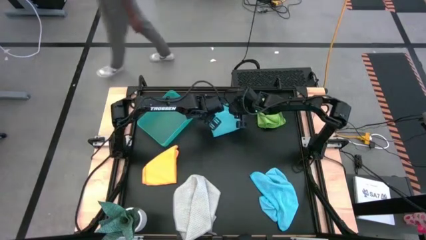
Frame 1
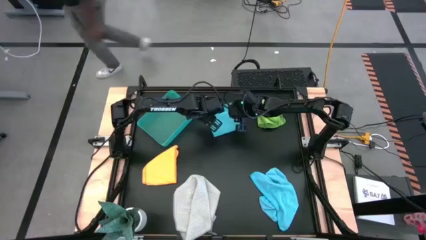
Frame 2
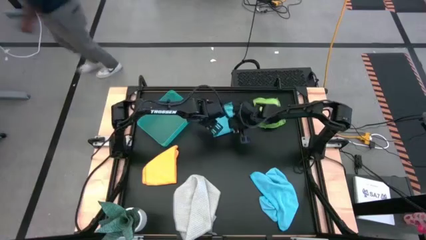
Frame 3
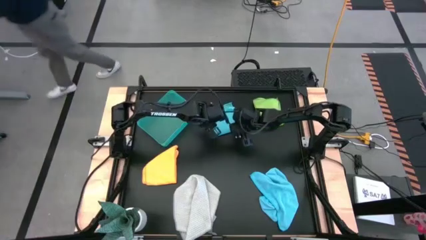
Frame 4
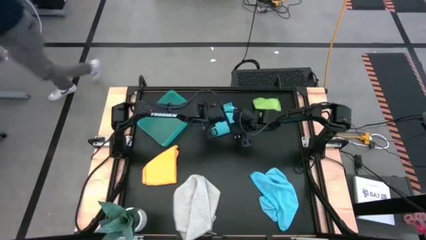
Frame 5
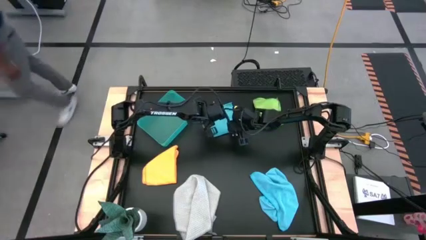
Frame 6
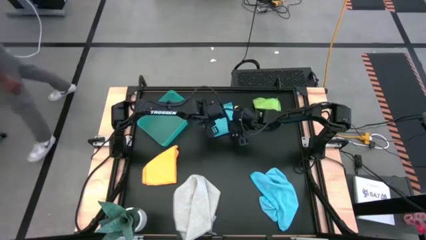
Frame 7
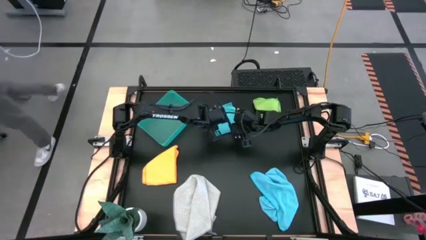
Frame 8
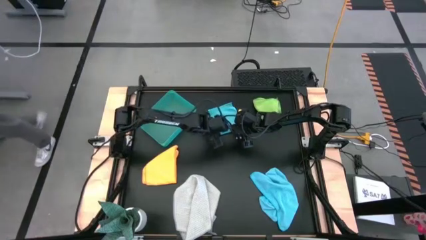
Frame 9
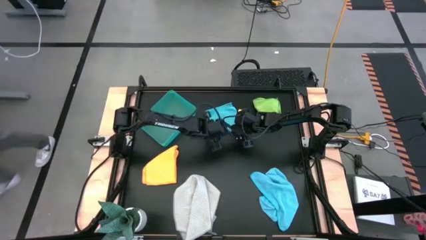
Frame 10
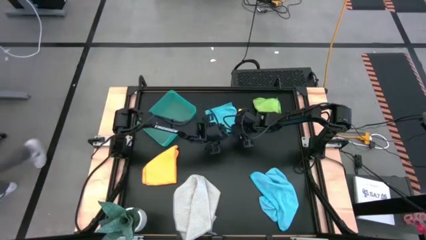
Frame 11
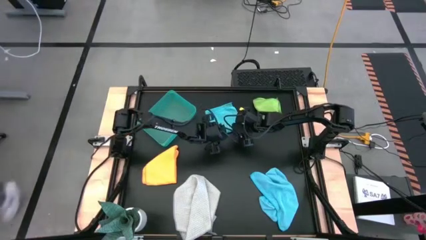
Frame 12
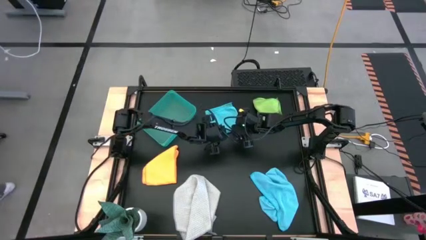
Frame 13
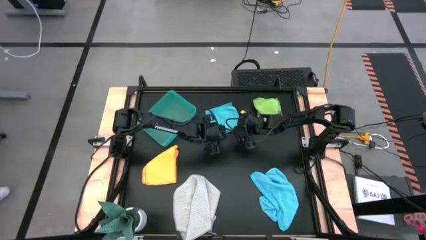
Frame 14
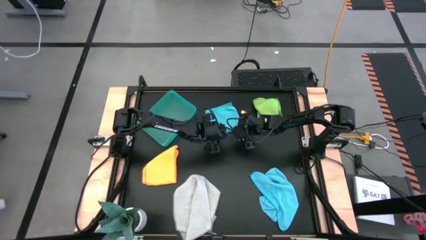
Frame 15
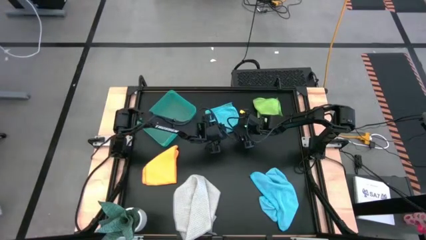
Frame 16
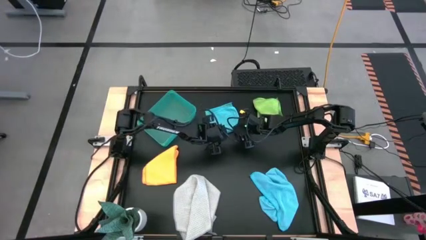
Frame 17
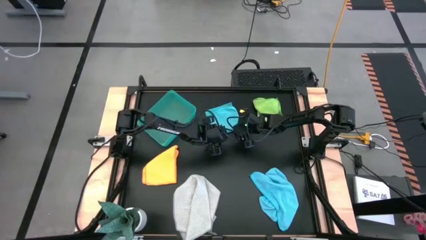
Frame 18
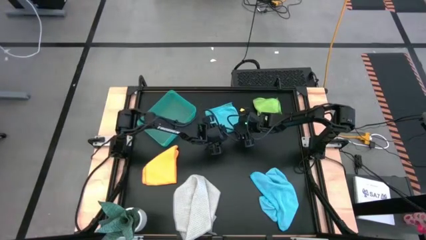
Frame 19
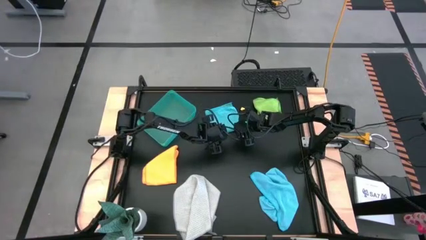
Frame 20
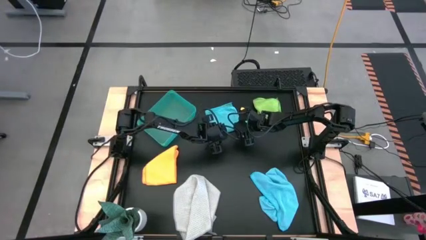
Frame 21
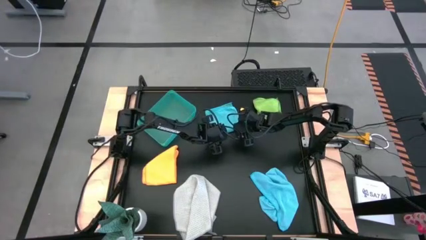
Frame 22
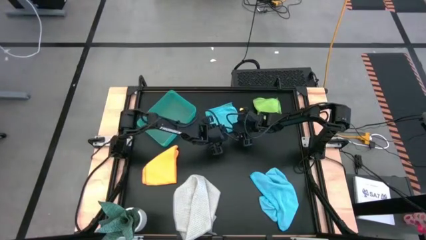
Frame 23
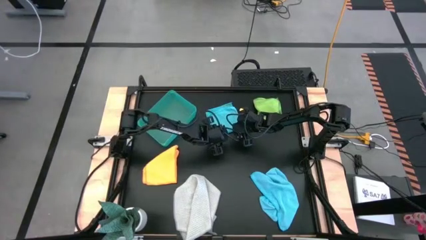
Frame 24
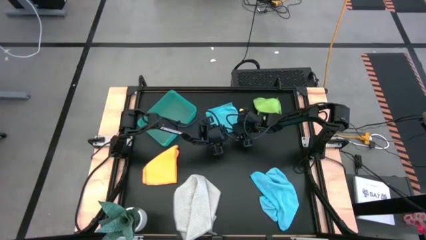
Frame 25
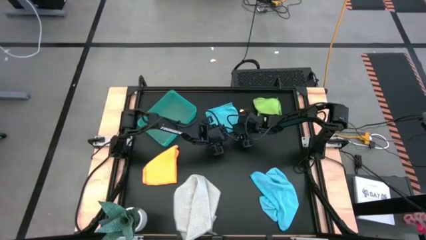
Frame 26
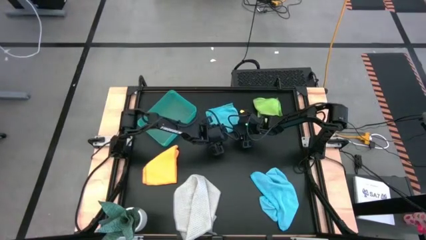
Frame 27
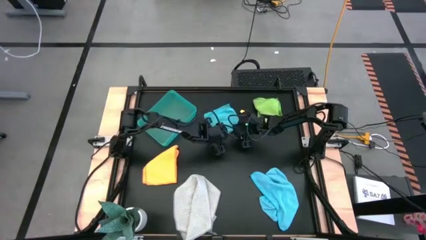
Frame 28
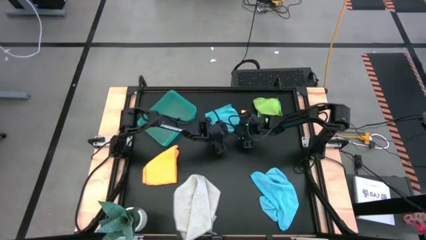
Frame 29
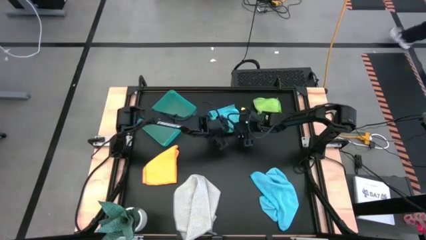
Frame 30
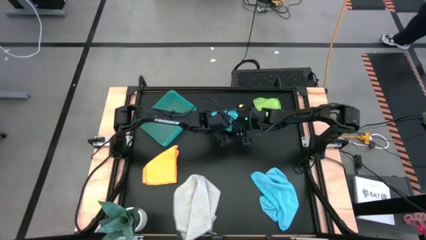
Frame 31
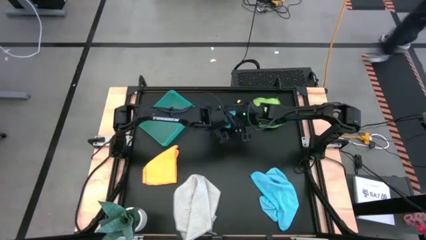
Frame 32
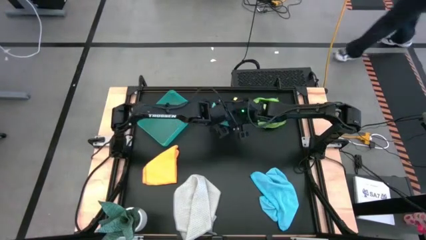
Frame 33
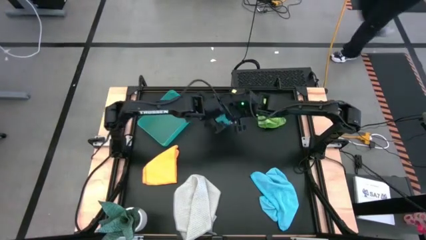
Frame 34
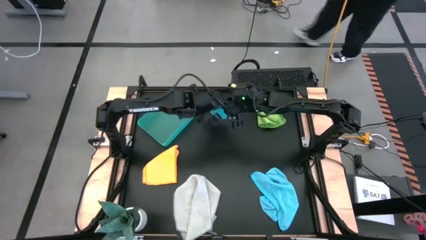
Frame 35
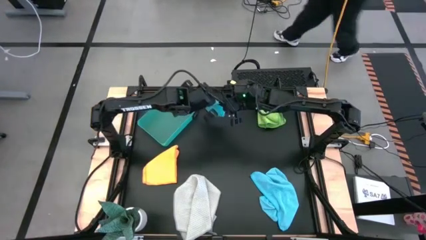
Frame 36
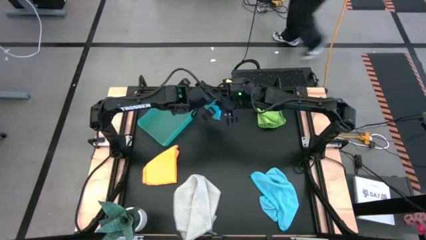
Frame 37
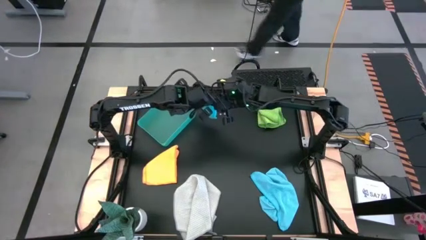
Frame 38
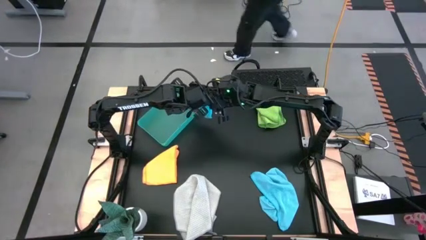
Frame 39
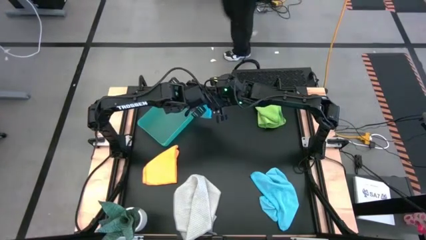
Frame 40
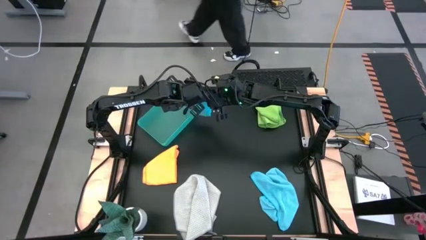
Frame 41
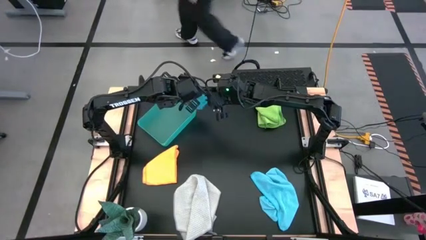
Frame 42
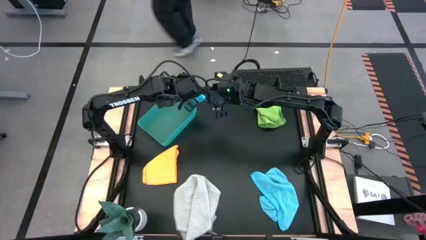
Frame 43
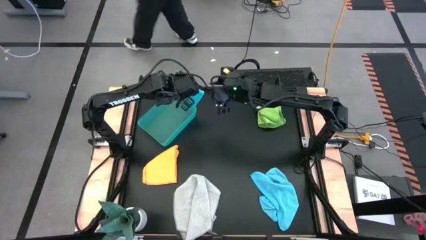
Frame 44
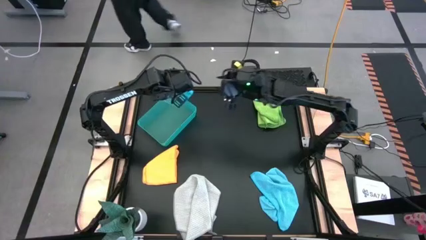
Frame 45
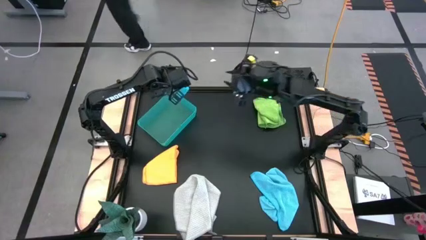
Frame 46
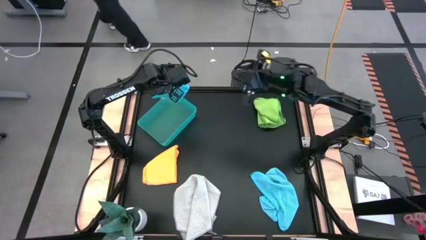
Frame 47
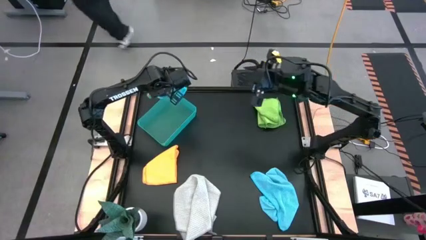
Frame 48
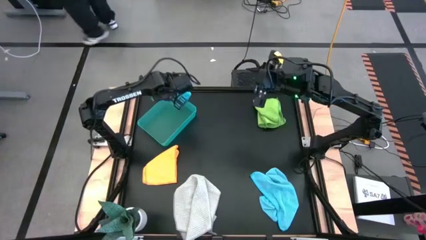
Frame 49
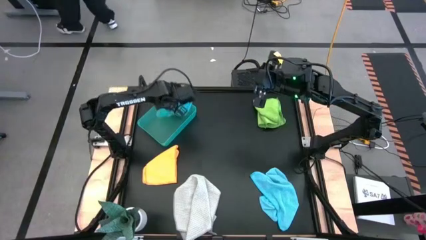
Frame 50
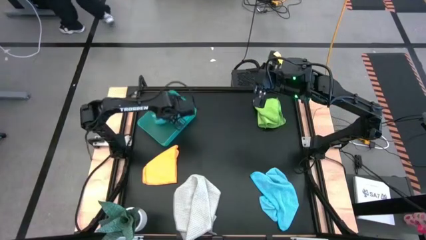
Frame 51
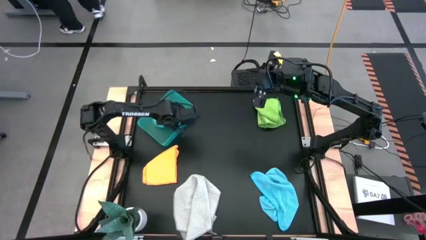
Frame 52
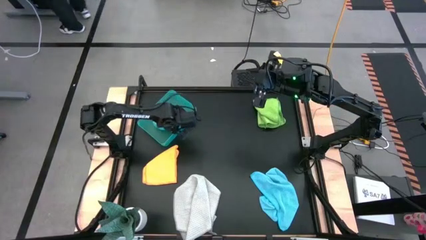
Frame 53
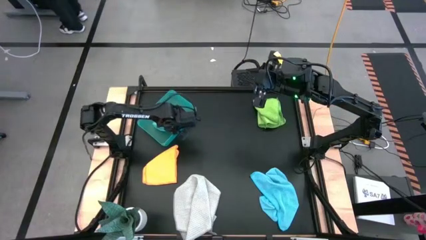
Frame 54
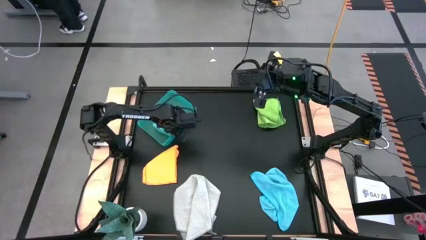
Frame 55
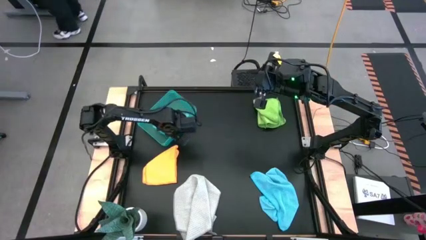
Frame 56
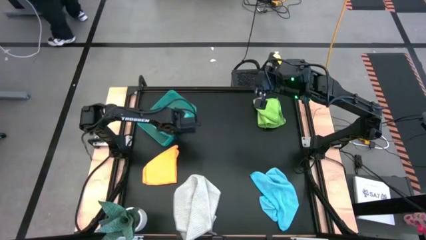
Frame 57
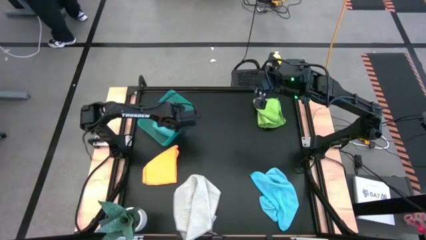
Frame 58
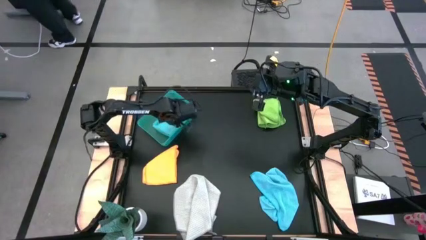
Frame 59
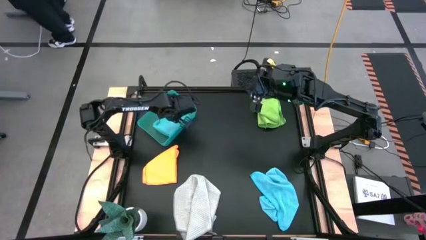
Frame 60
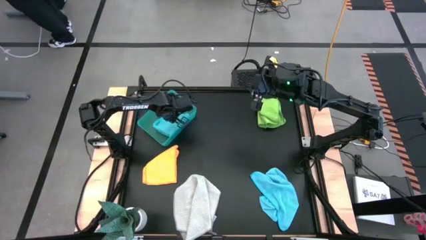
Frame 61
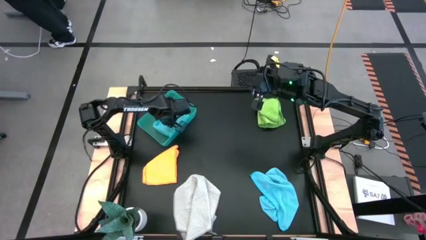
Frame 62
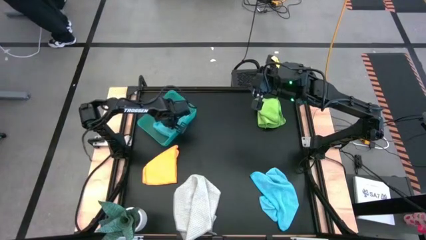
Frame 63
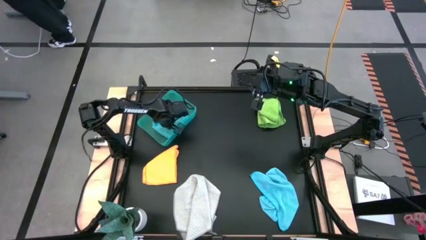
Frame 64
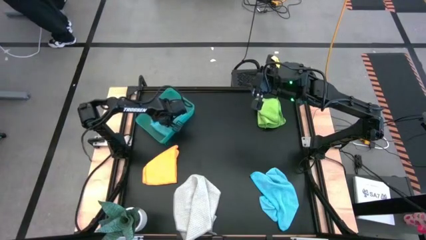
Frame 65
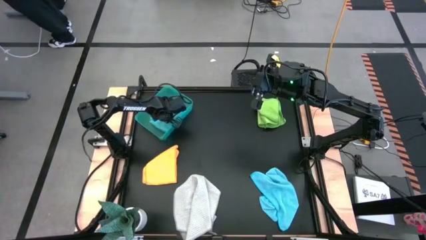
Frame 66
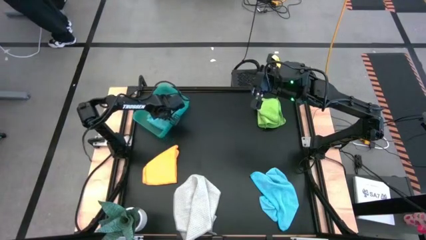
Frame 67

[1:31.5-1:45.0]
Task: Fold microfiber towels
Put the folded blue microfiber towel into the bin

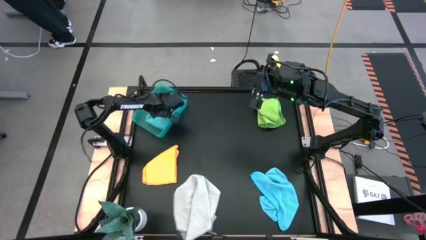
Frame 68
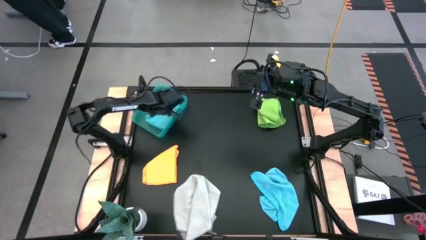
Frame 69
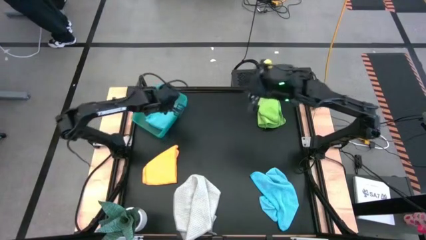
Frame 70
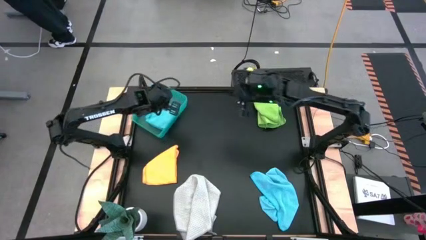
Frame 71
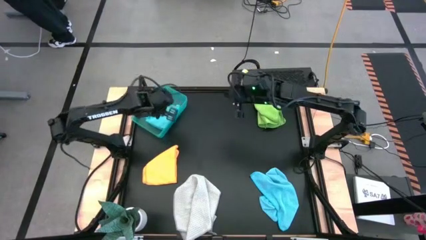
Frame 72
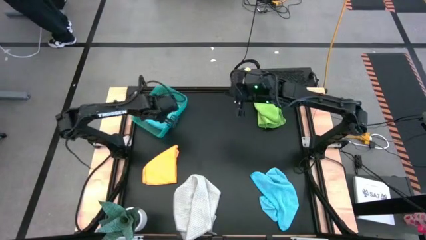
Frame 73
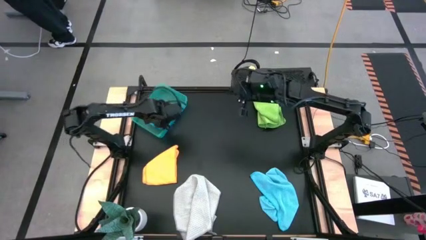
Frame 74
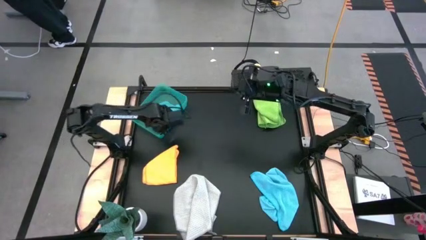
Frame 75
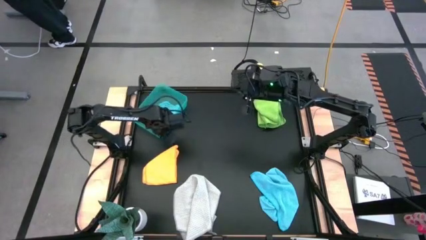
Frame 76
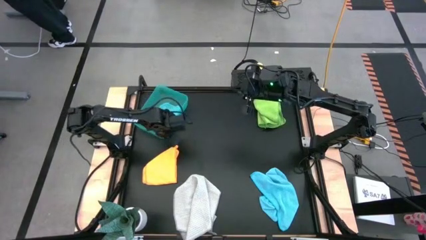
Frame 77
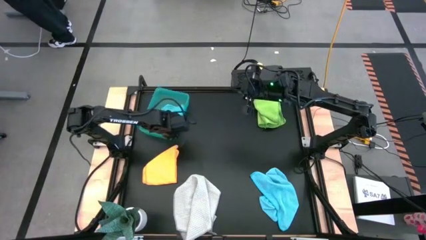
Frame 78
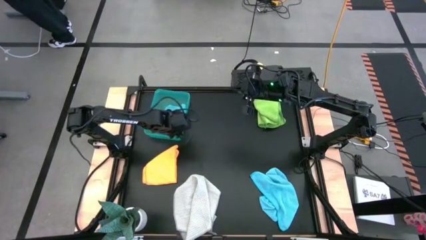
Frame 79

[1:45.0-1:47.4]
Adjust the bin on the table

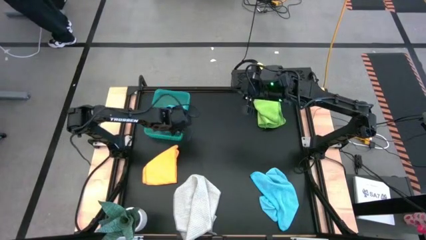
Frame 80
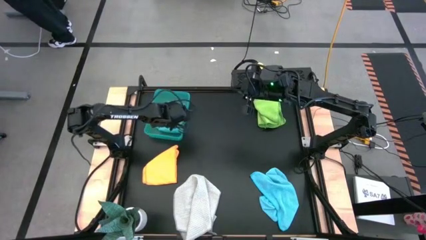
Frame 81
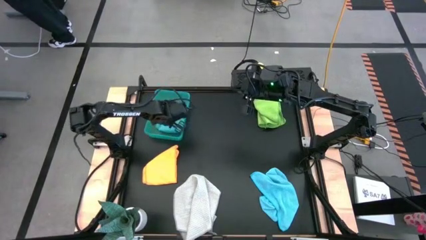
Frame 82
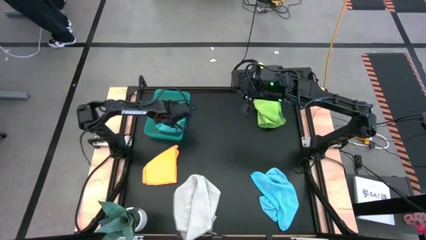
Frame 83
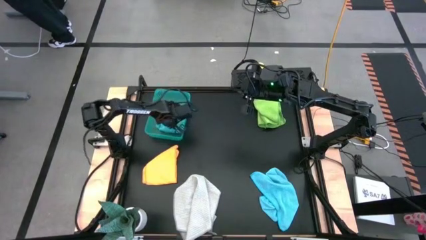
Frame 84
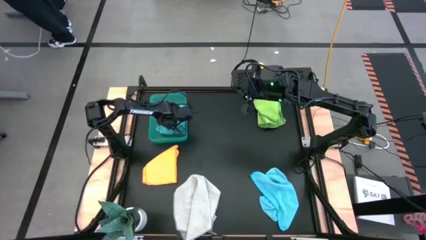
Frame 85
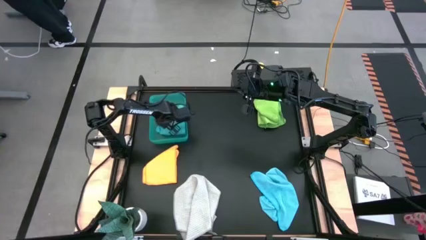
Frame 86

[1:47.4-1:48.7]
Adjust the blue microfiber towel in the bin
